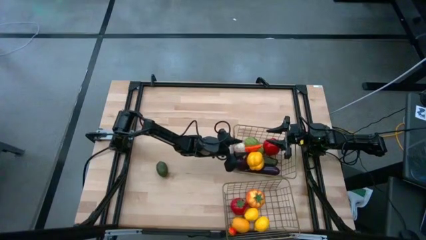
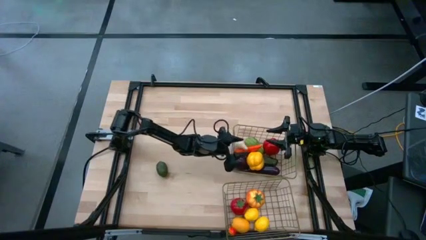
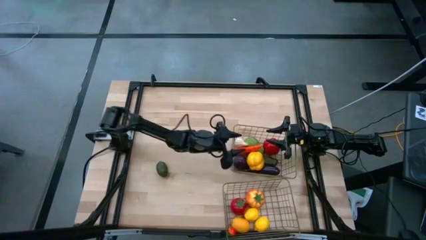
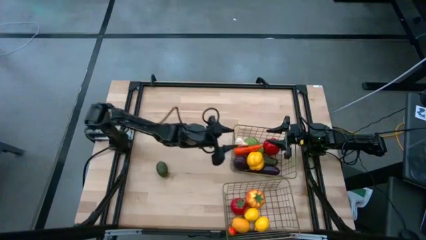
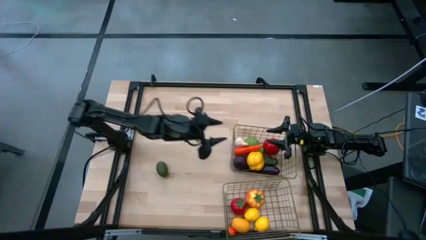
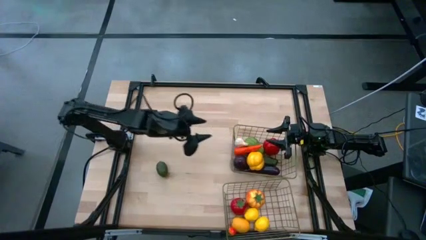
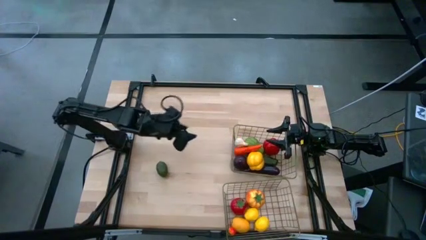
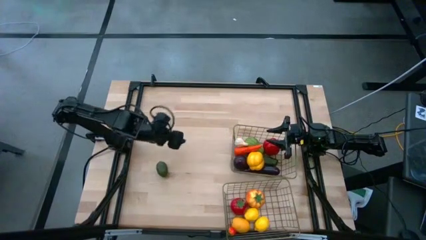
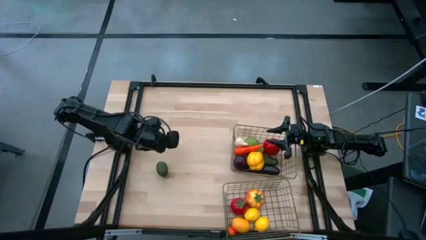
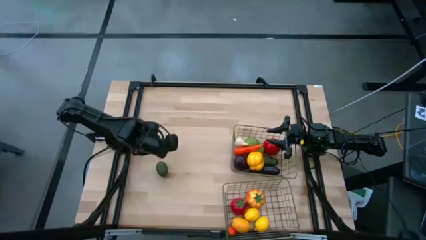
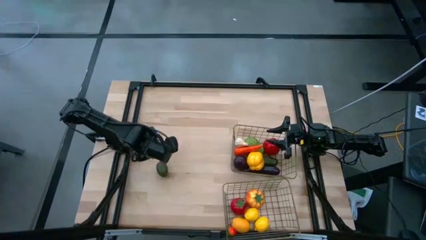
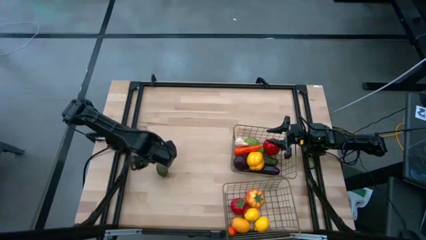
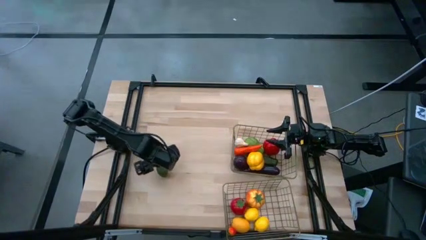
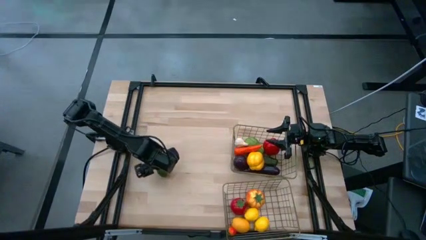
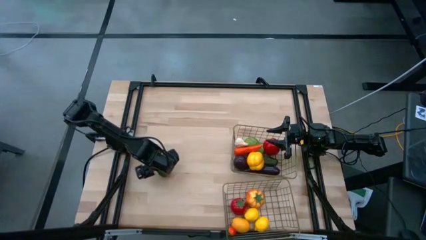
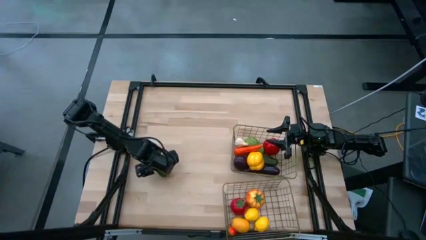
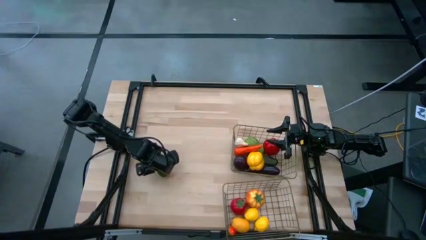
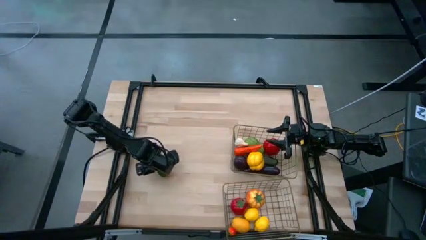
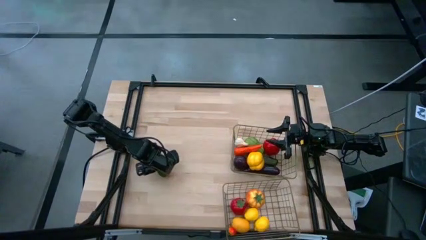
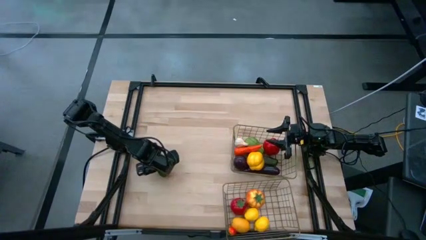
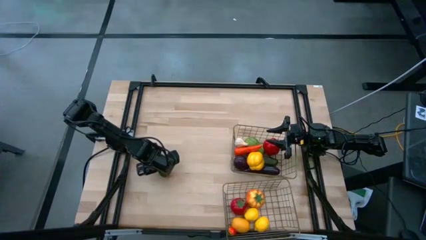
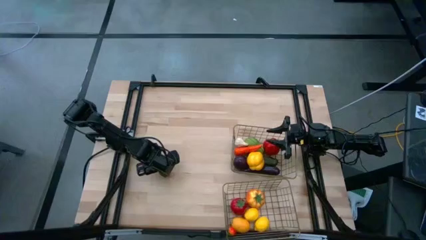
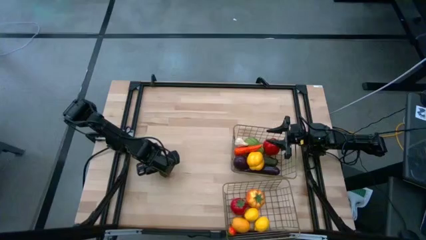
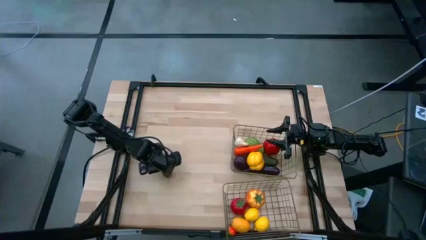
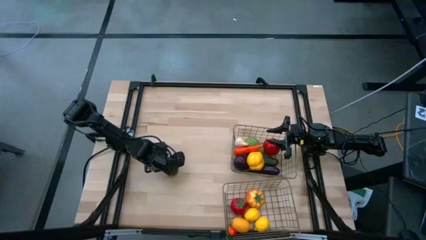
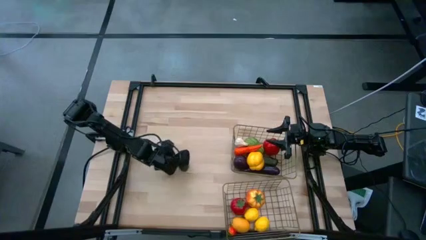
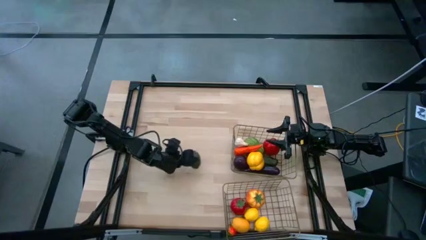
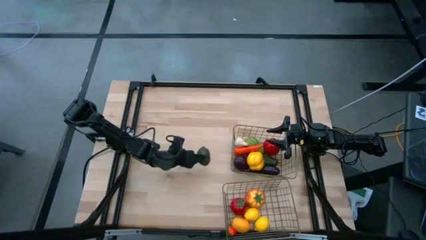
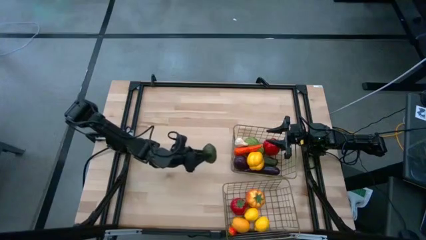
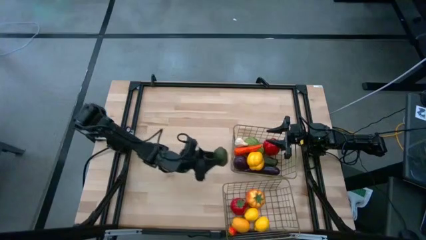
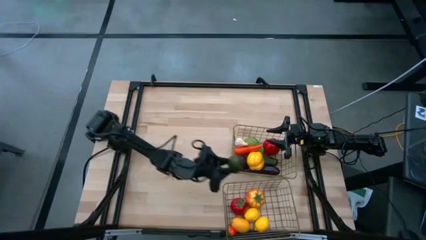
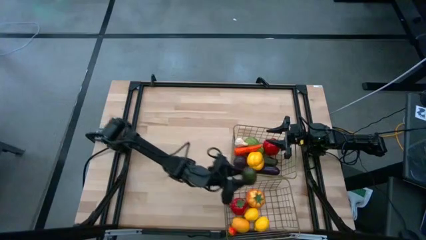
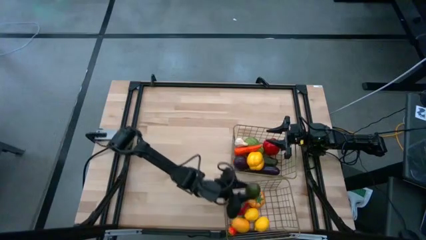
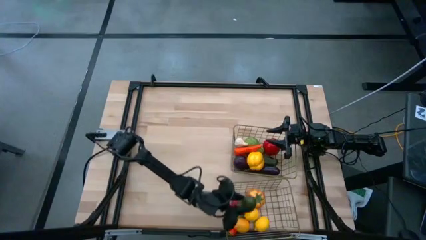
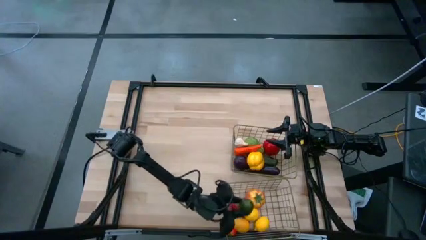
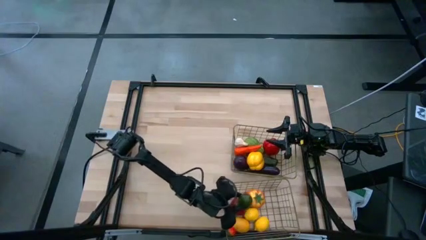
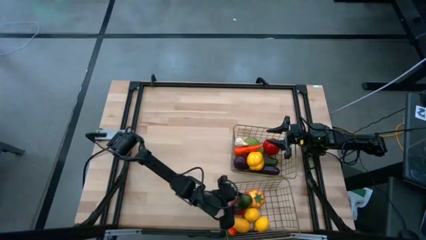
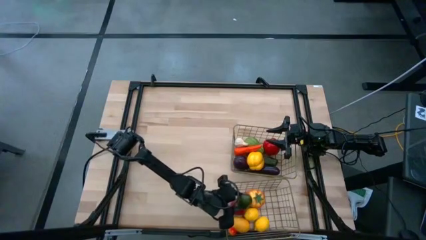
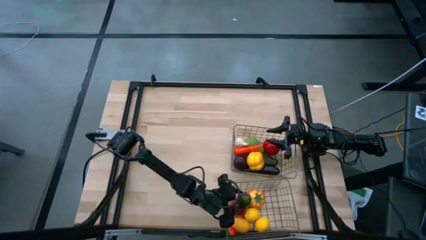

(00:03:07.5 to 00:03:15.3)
Task: Sort produce into baskets
Put the lime into the bottom wire basket

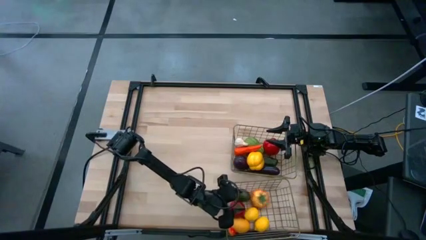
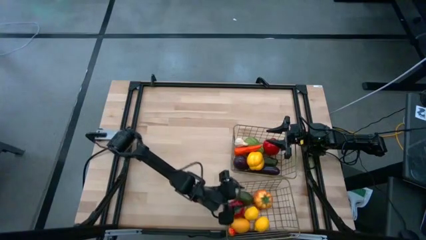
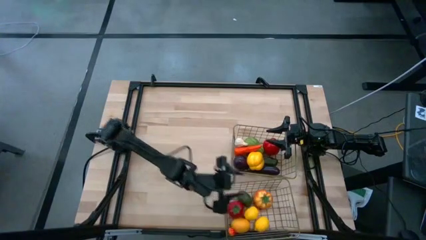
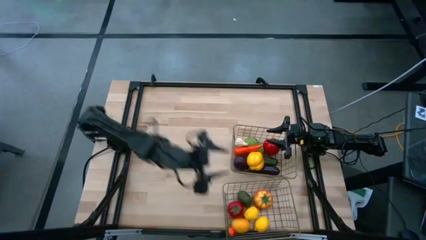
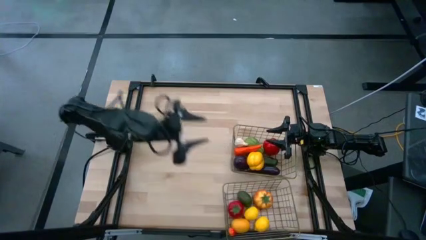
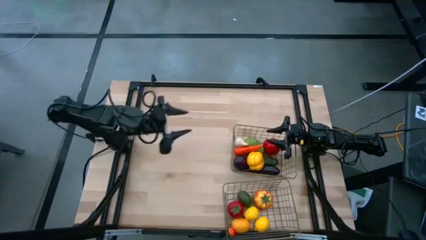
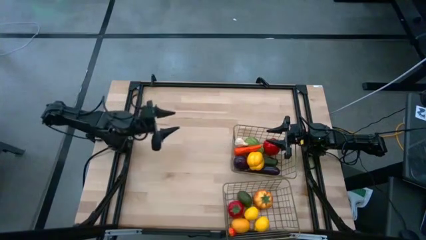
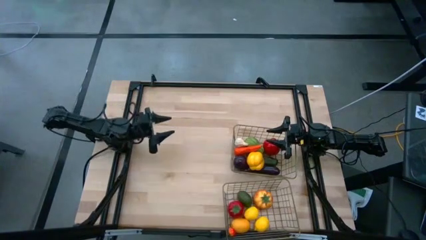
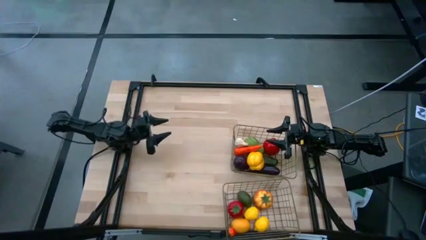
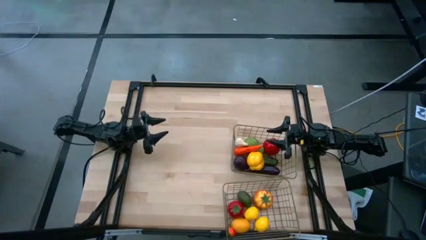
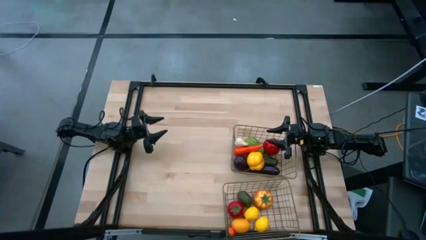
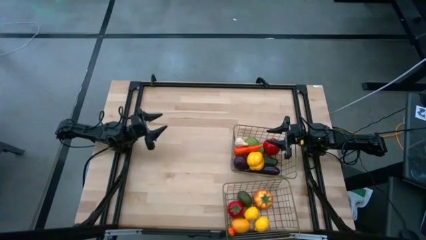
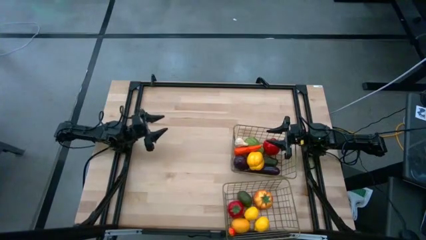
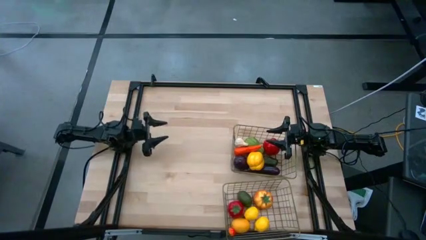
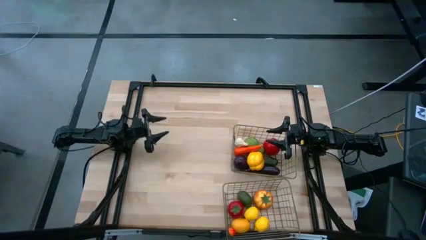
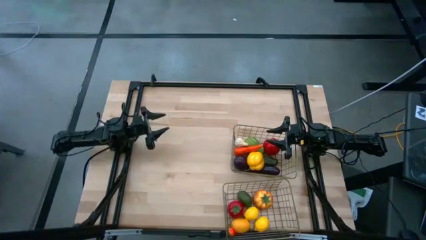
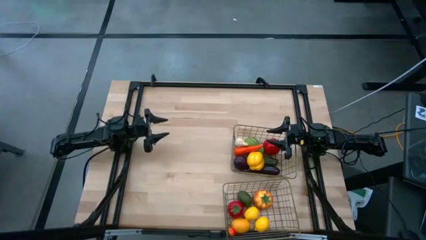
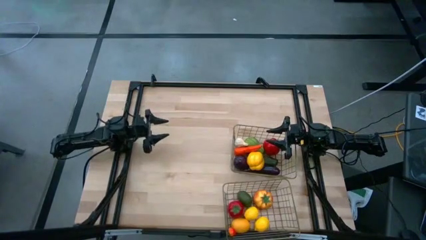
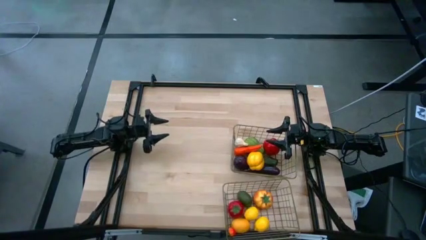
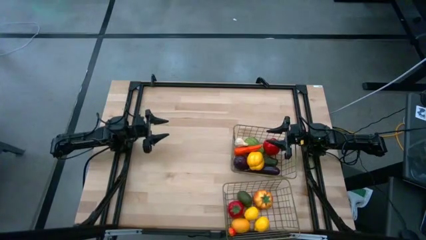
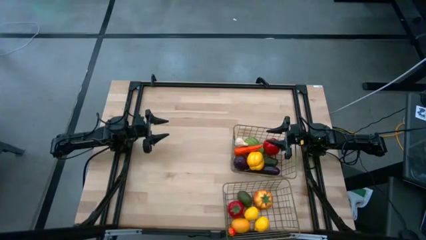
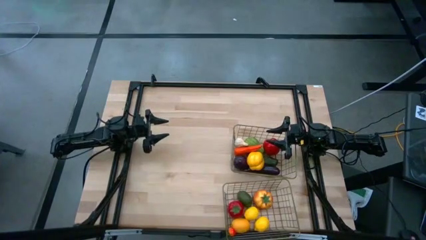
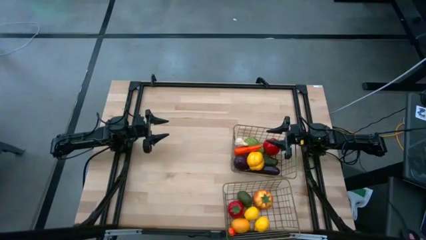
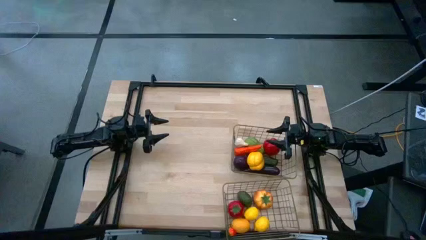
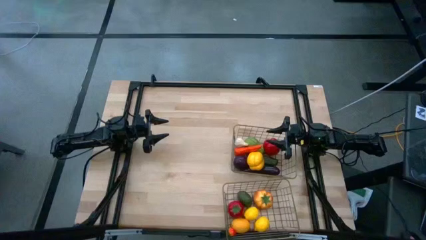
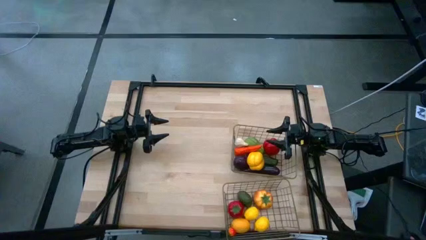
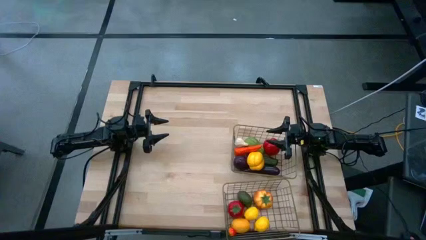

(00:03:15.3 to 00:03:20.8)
Return to Home Position

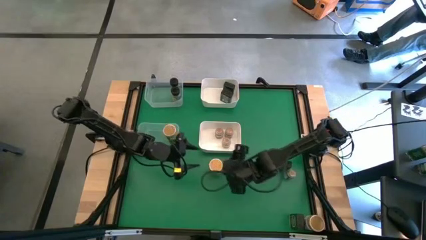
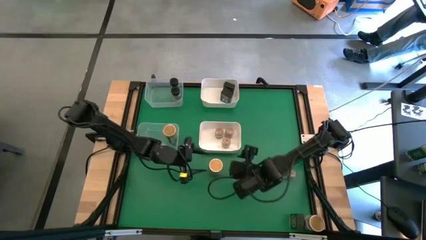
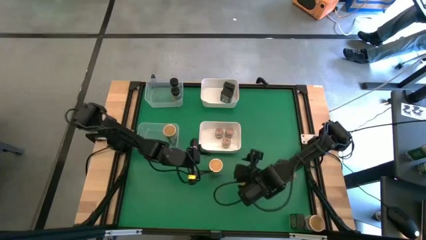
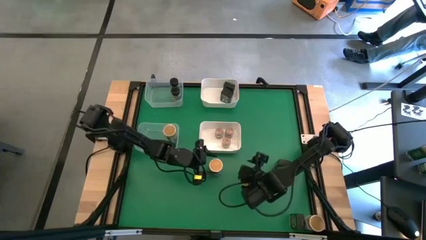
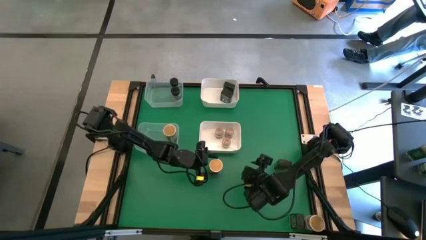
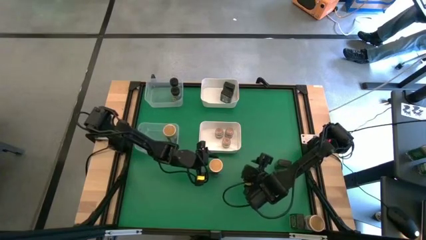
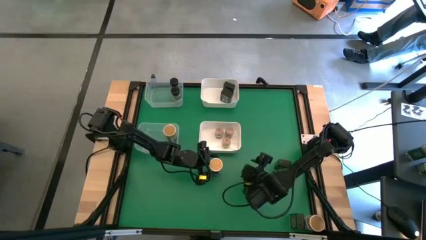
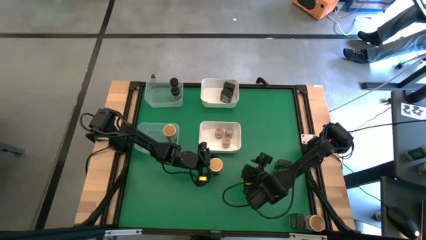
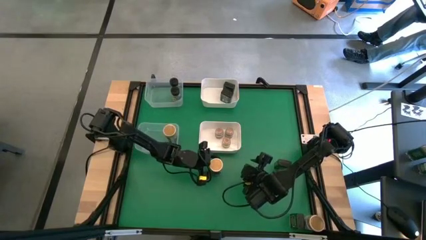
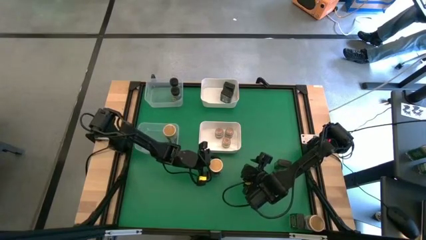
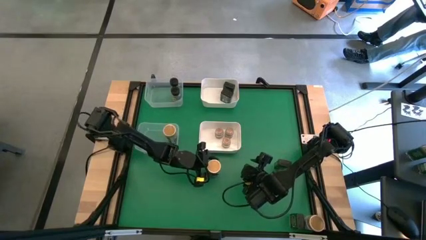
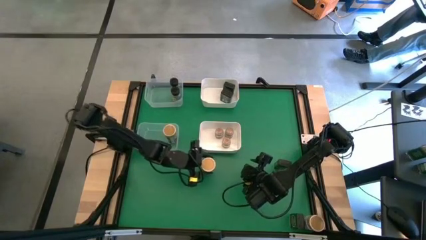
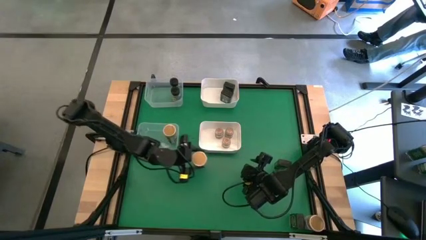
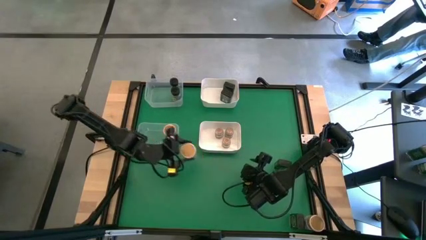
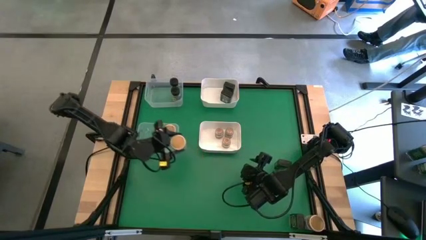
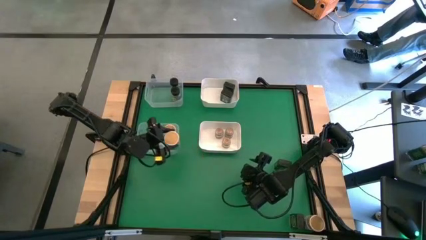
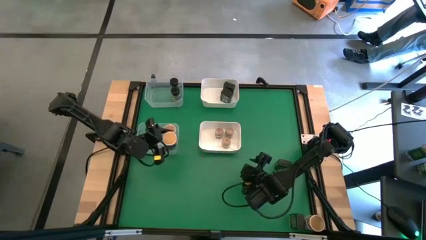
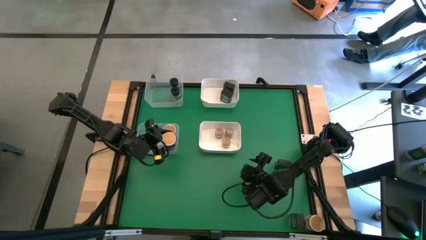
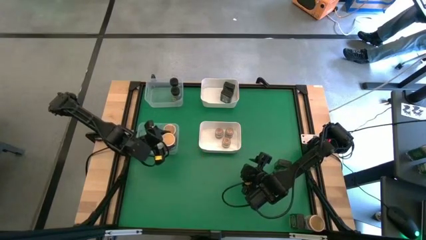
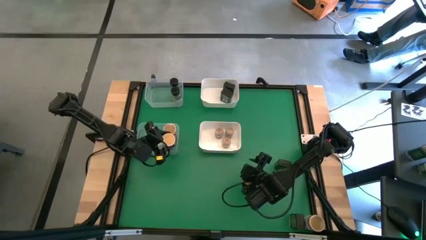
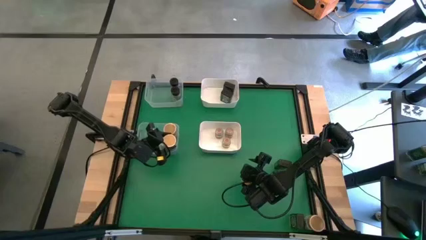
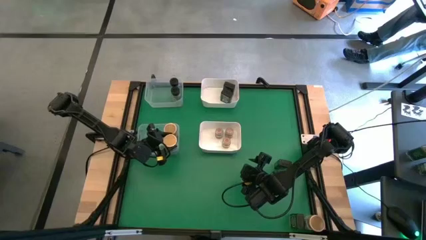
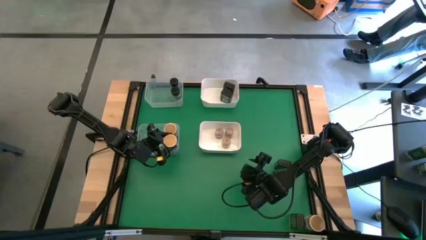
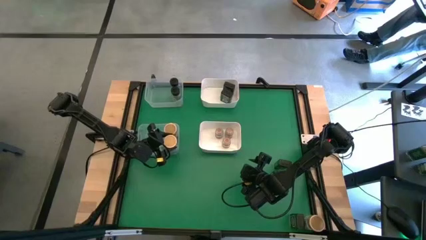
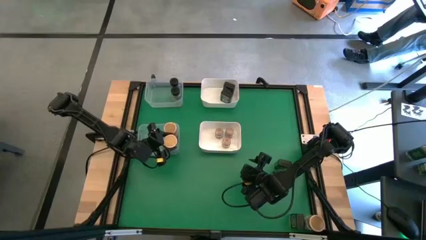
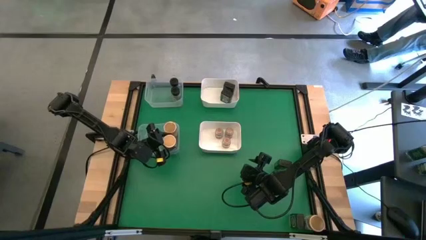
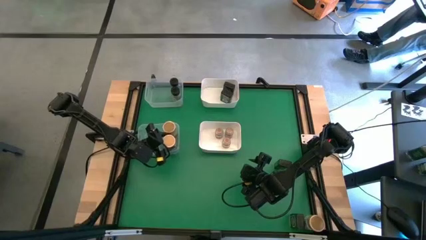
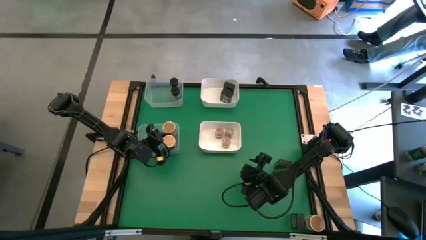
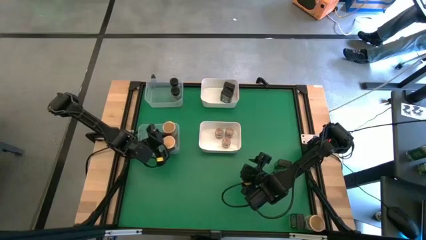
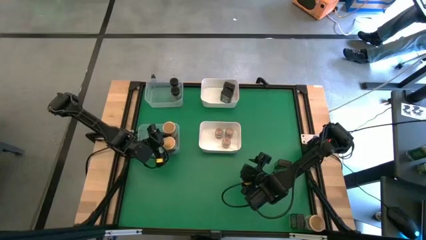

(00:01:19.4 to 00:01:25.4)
Task: Sort spices by type
Put the center light brown seasoning bottle into the bottom transparent bin
